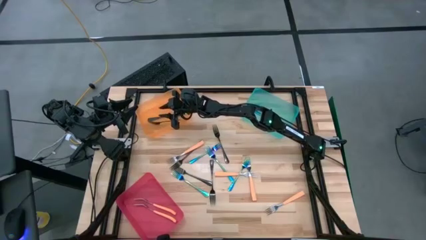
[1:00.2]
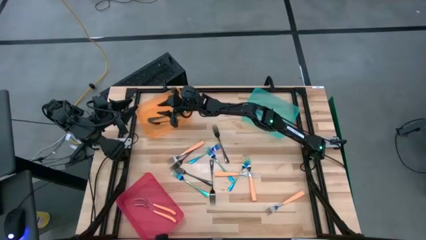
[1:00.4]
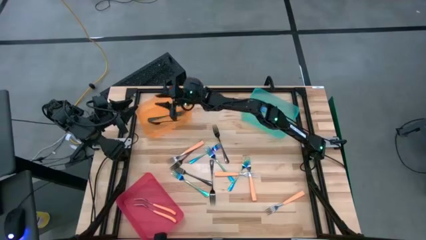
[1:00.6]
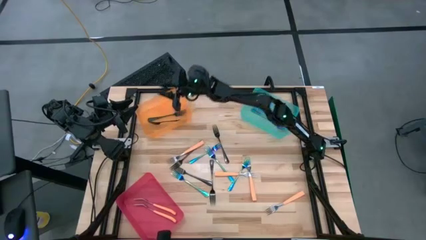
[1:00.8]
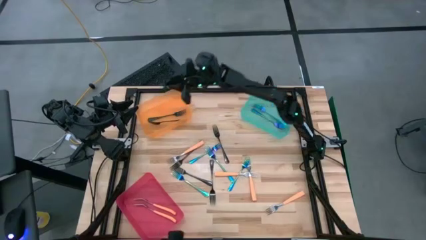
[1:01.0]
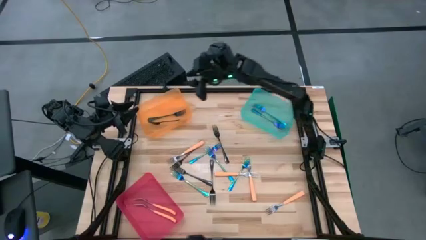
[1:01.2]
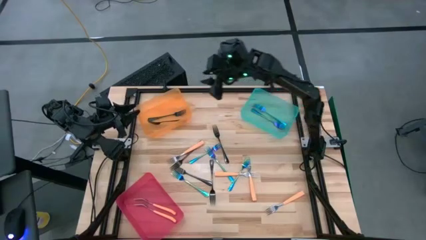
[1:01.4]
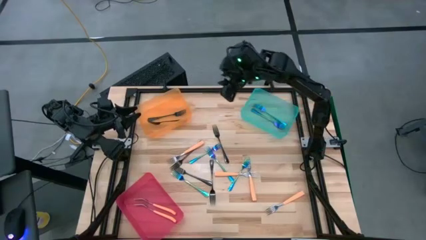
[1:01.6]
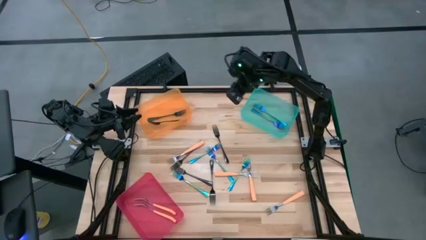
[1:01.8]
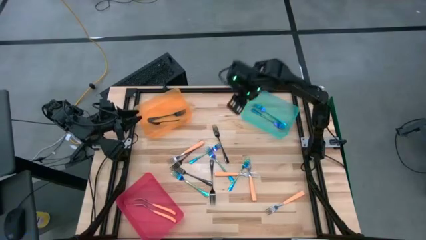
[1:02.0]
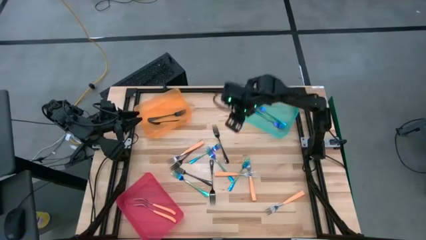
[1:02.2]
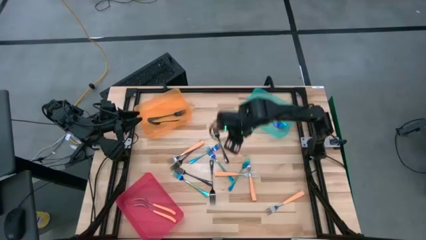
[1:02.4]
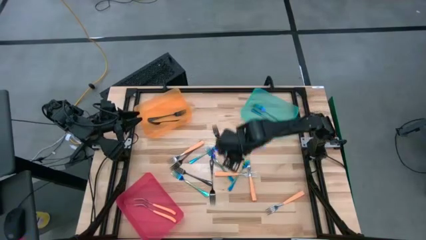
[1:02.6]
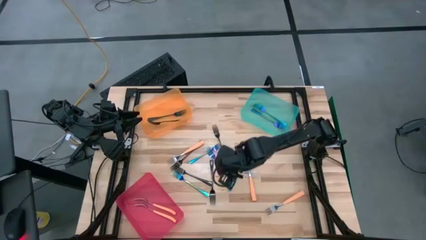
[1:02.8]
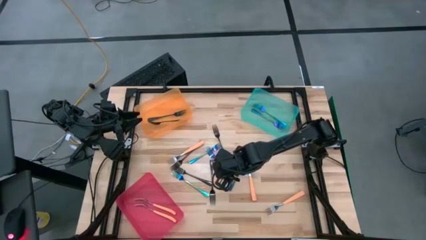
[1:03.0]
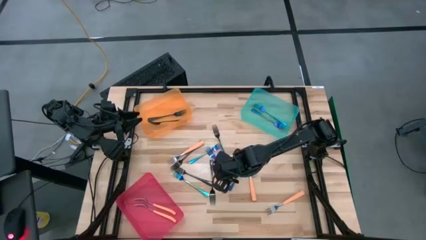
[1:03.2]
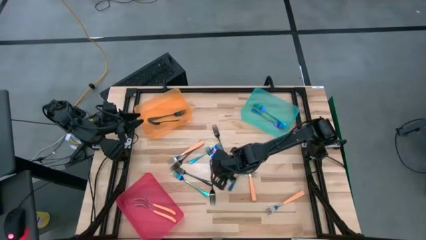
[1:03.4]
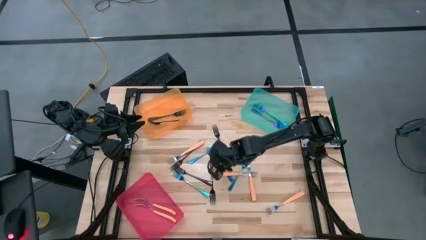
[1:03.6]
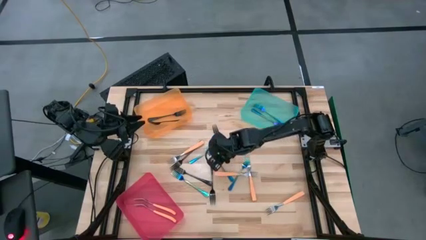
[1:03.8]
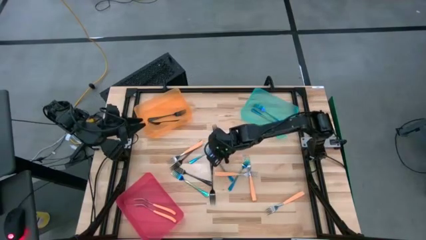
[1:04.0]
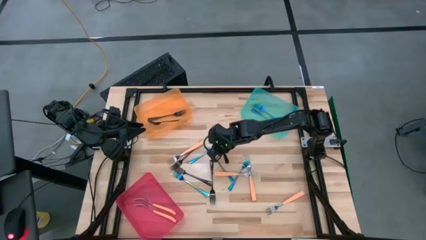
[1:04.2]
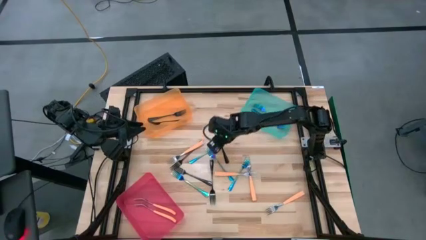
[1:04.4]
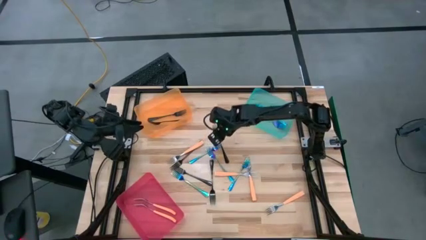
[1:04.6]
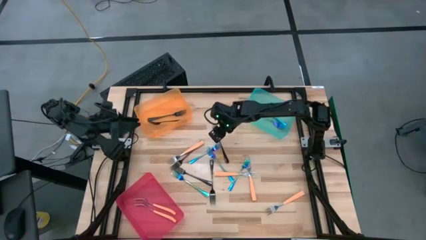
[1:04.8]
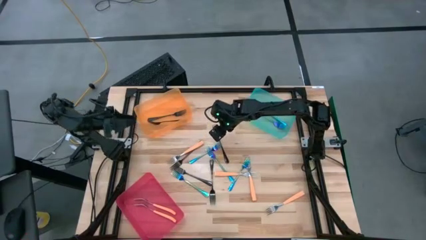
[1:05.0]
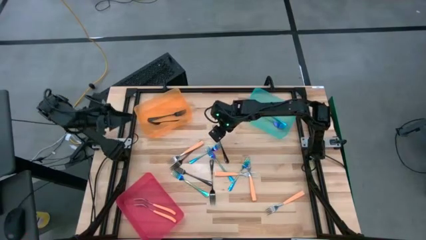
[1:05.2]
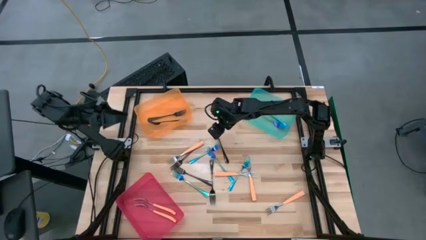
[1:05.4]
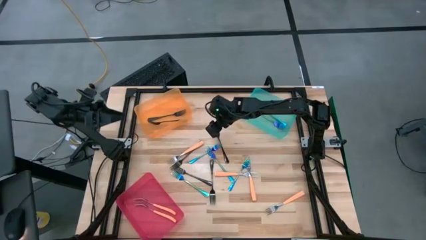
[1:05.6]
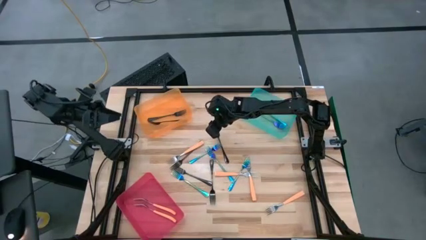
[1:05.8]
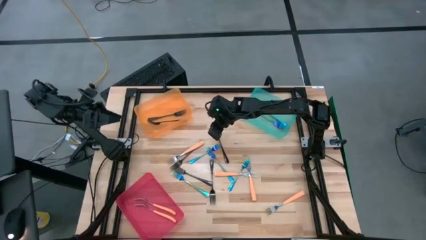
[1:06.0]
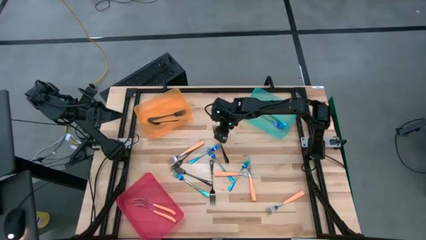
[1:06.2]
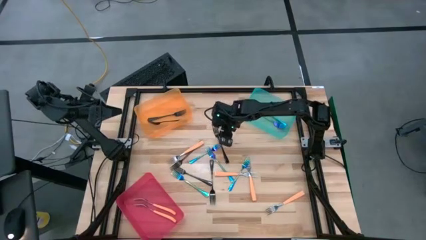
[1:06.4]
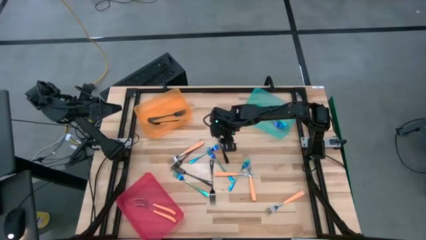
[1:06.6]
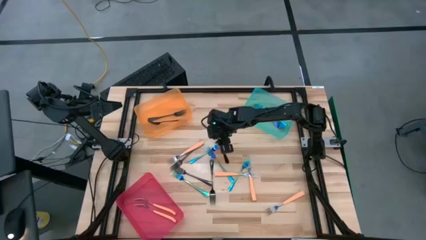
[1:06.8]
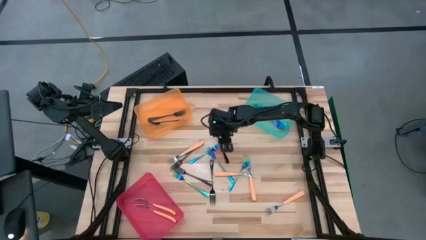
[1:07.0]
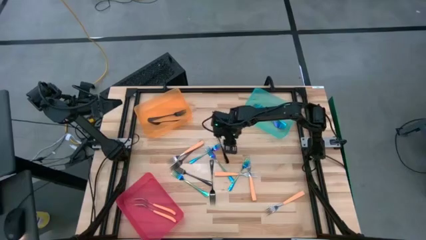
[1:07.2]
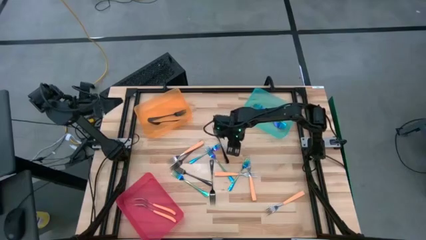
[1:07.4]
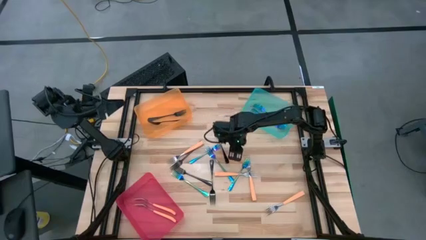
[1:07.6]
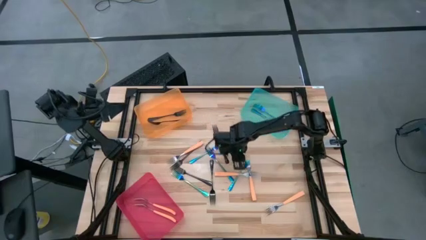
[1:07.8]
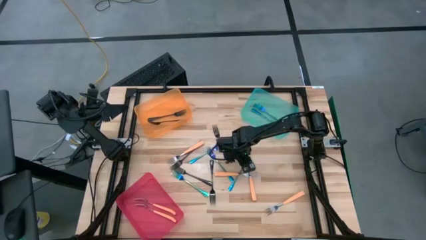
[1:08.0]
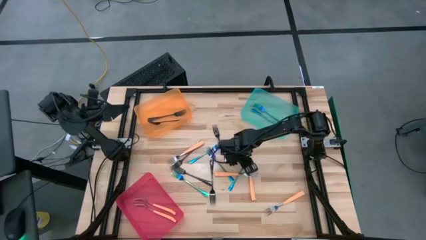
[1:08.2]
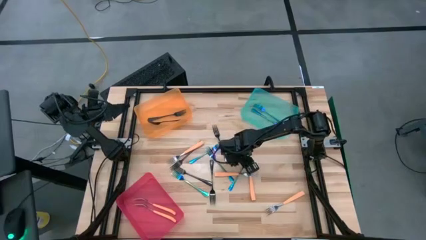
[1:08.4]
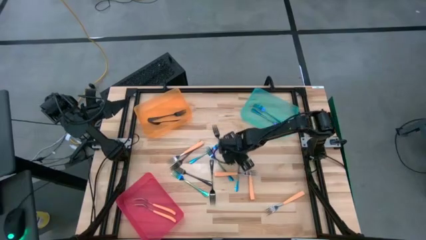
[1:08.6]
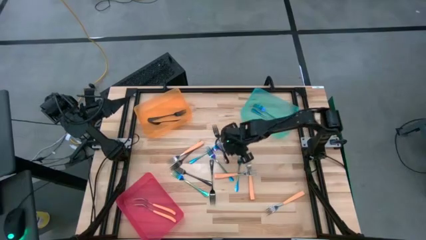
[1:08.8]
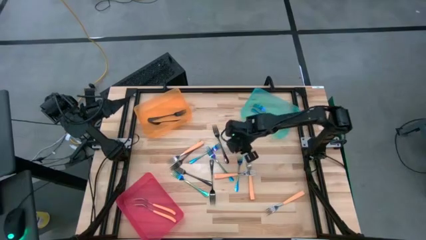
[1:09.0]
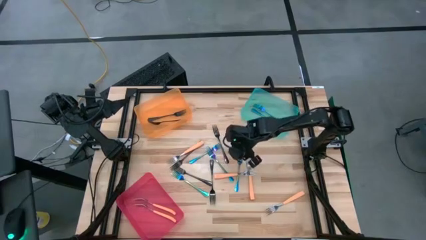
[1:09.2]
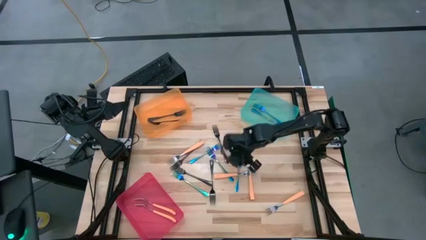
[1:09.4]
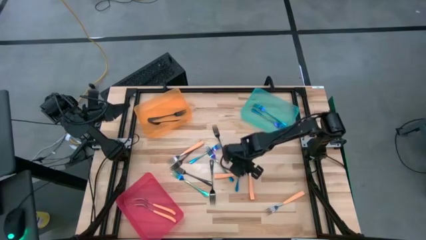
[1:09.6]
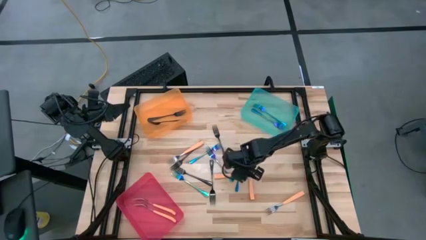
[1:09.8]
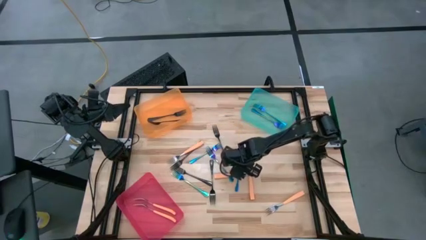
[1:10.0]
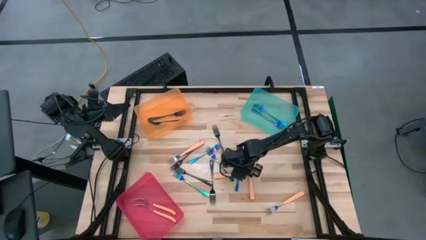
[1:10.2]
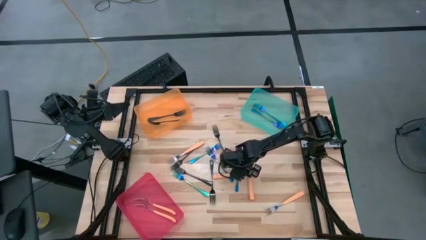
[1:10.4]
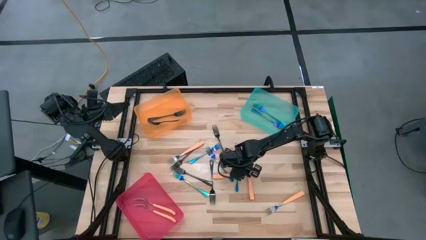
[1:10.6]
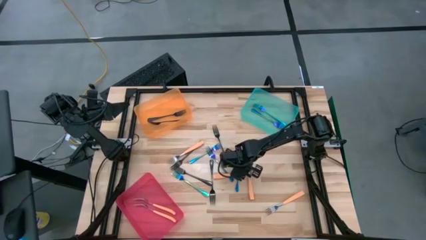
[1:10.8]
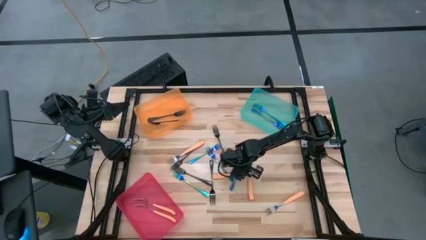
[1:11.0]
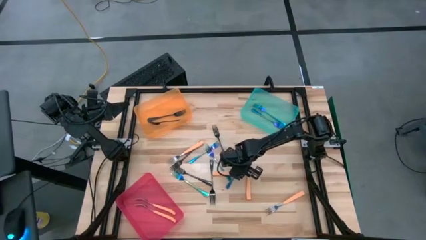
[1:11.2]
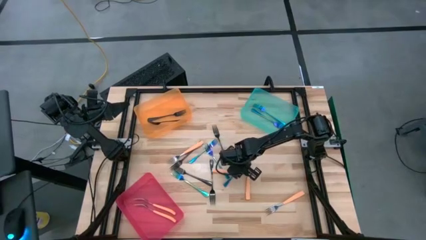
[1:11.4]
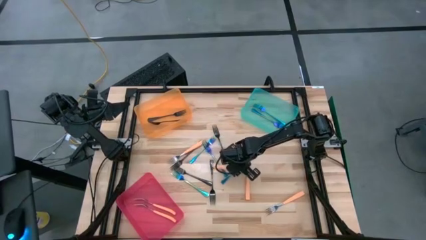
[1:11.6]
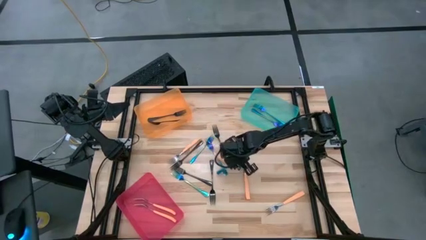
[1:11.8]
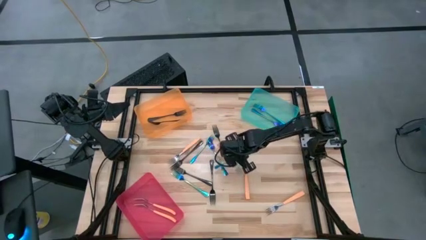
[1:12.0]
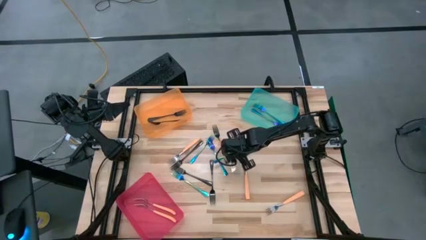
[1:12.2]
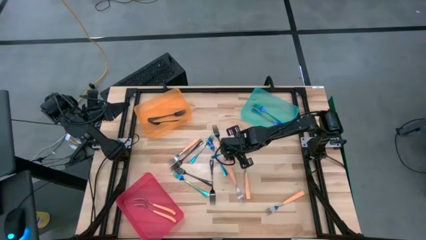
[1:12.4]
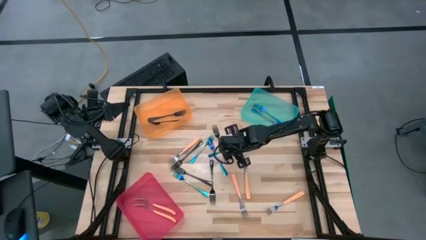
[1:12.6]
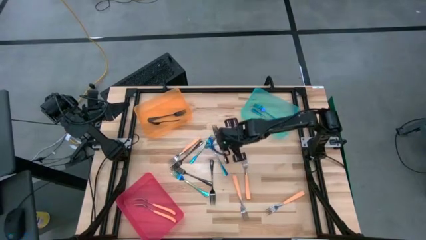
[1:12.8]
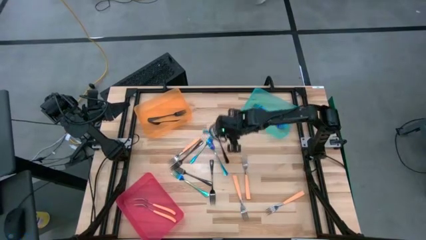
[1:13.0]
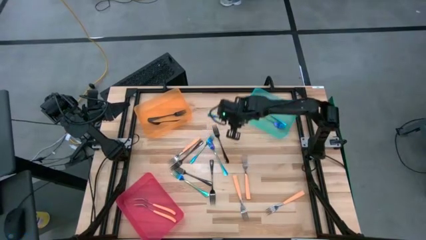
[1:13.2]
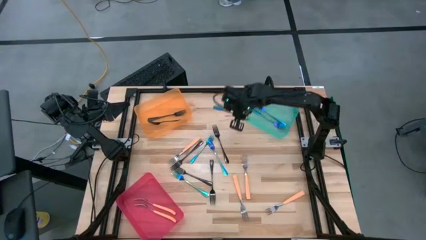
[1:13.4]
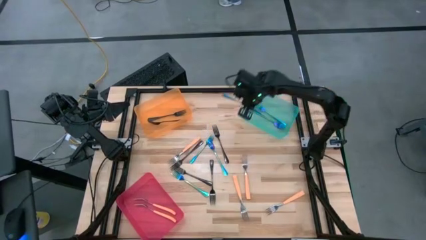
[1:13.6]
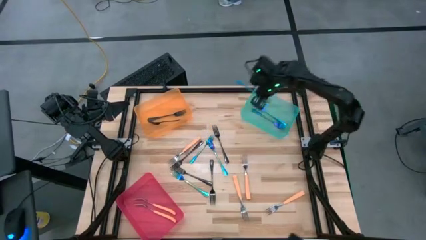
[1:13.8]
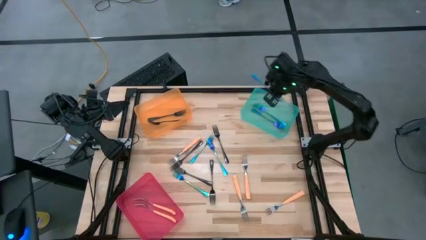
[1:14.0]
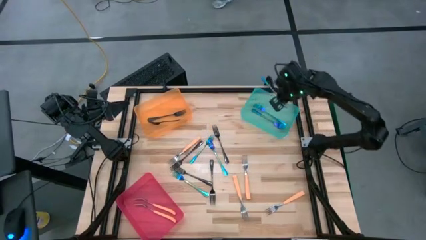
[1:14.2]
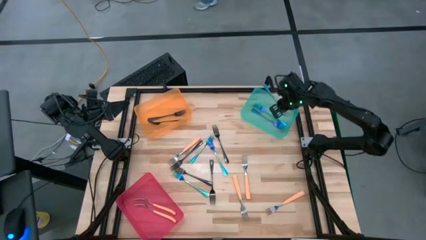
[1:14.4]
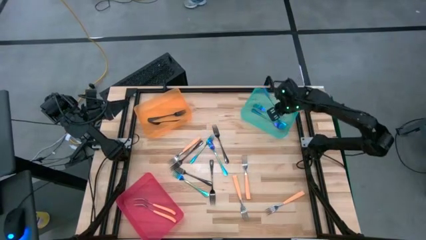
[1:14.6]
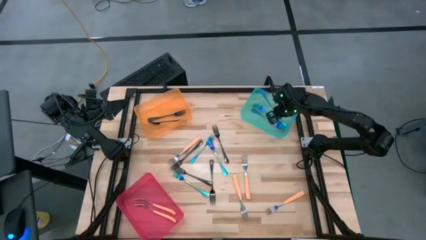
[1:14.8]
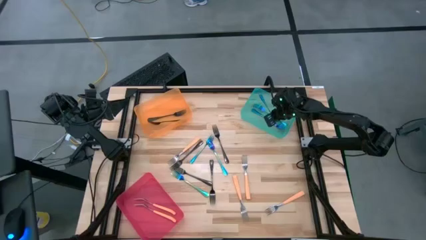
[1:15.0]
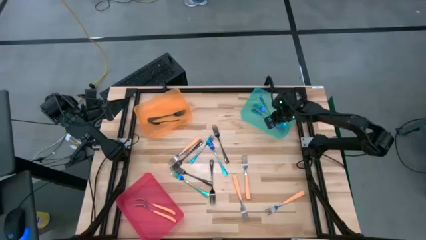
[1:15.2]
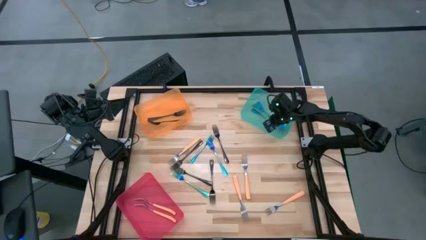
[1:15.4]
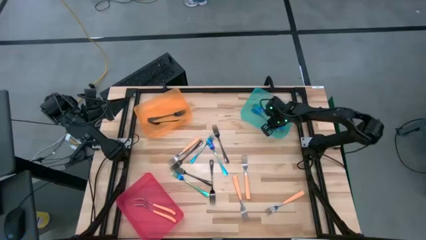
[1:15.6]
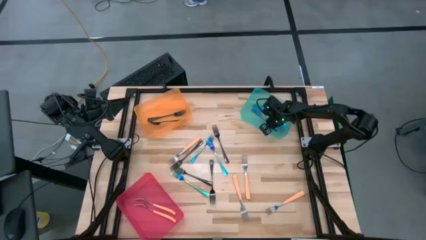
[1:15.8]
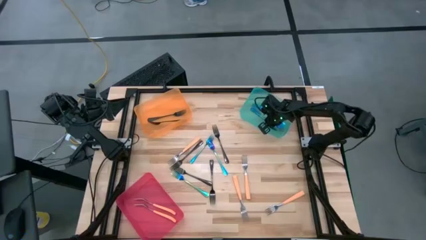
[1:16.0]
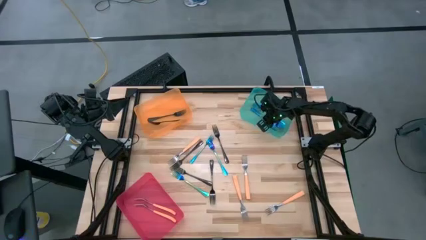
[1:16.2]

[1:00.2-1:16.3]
Task: Sort silverware by color (type)
Put the iridescent fork into the green bin
